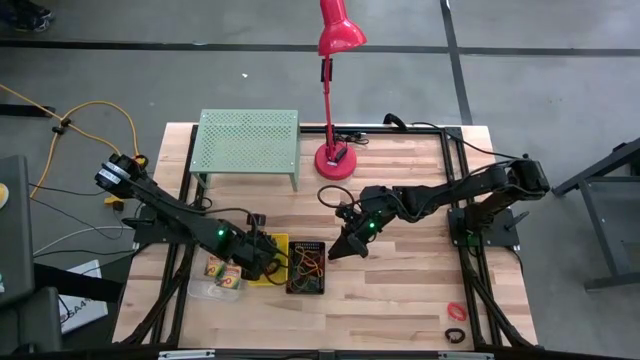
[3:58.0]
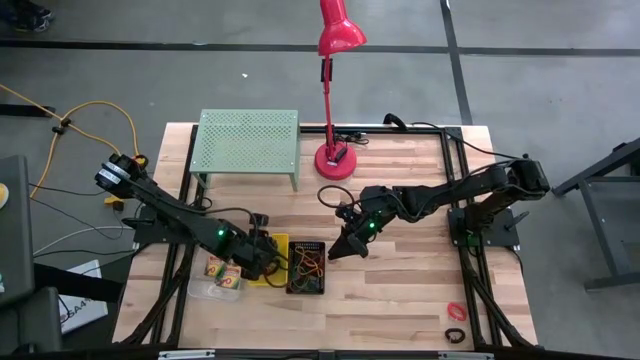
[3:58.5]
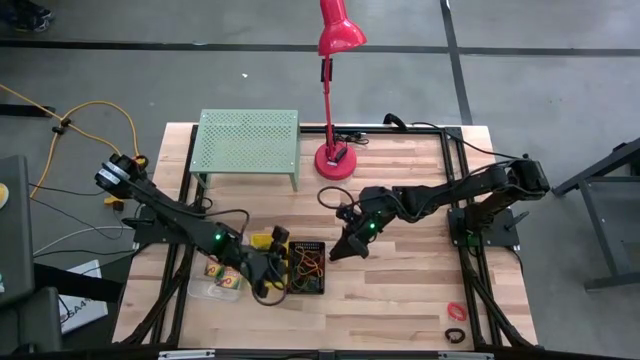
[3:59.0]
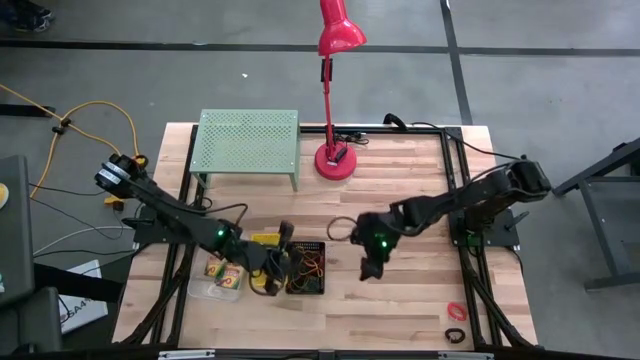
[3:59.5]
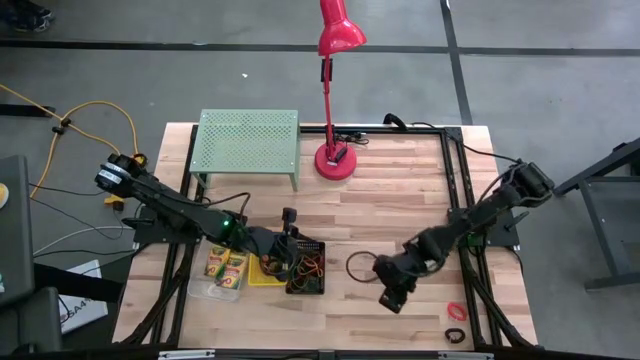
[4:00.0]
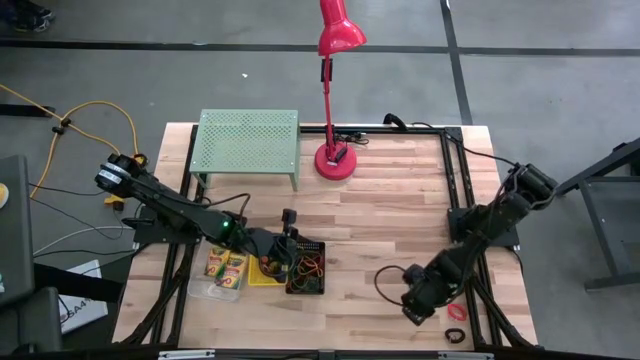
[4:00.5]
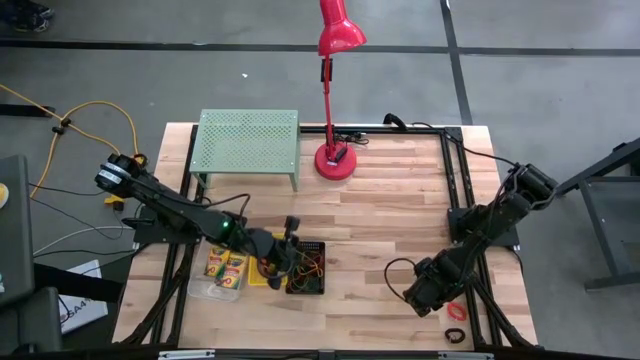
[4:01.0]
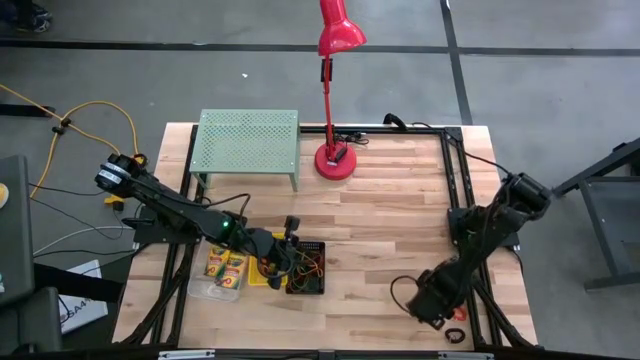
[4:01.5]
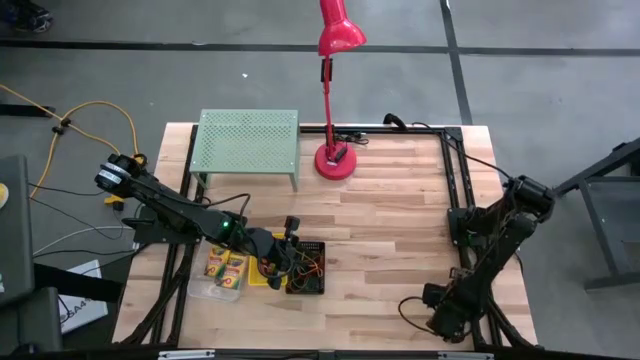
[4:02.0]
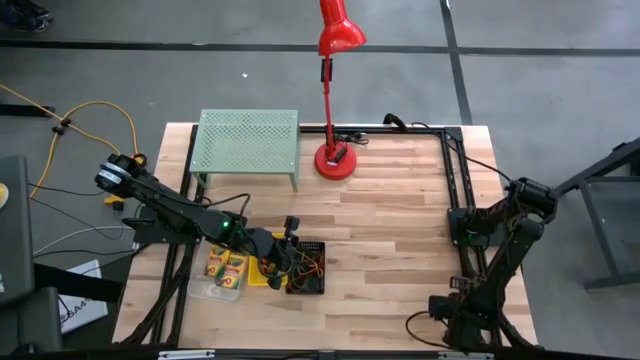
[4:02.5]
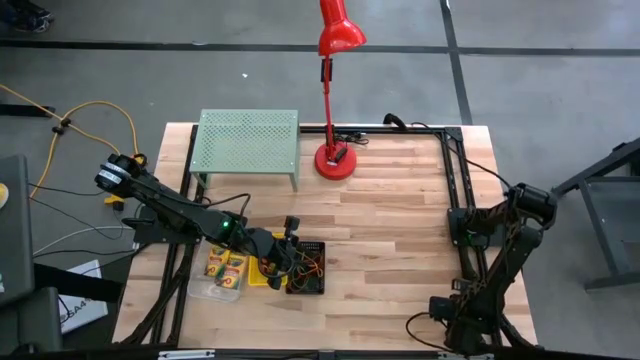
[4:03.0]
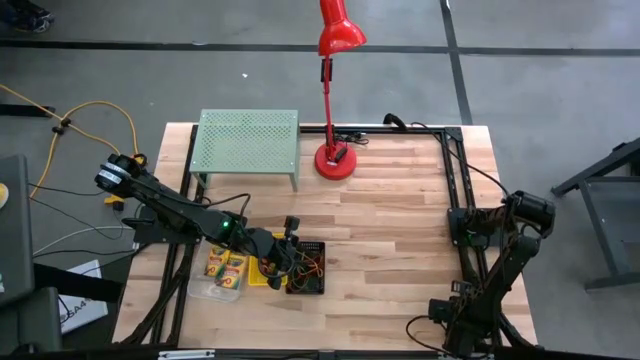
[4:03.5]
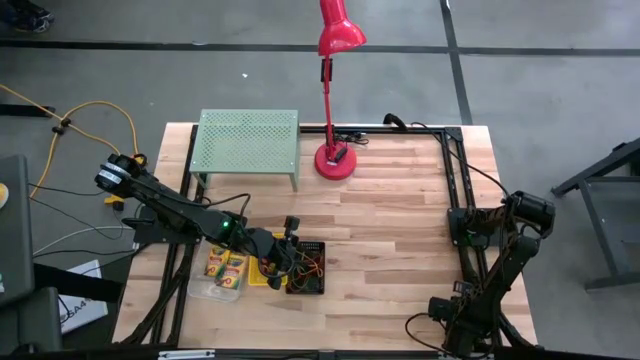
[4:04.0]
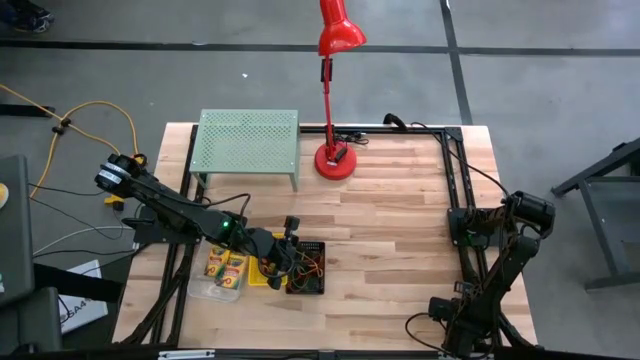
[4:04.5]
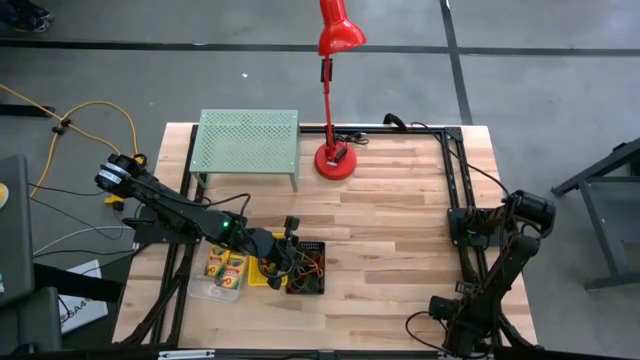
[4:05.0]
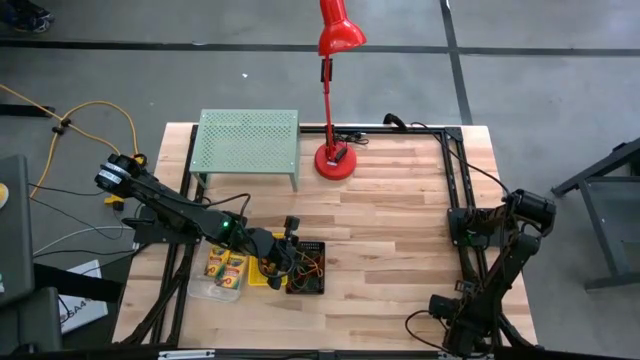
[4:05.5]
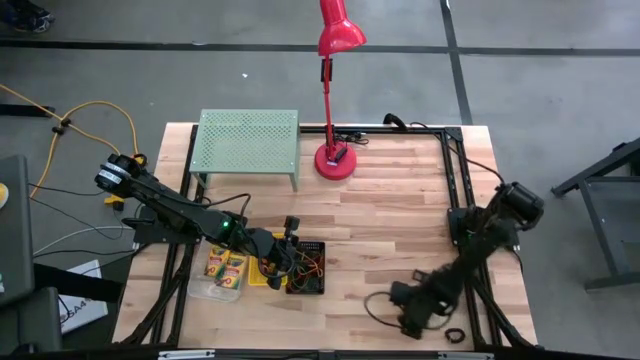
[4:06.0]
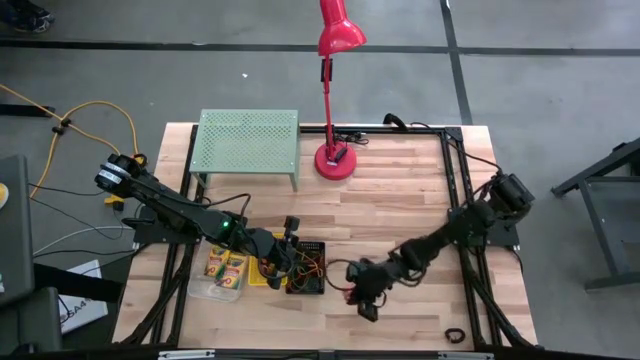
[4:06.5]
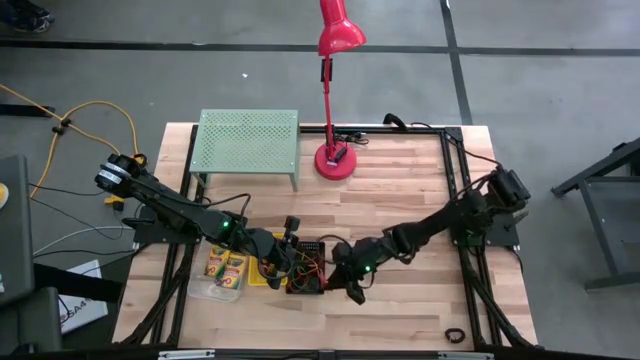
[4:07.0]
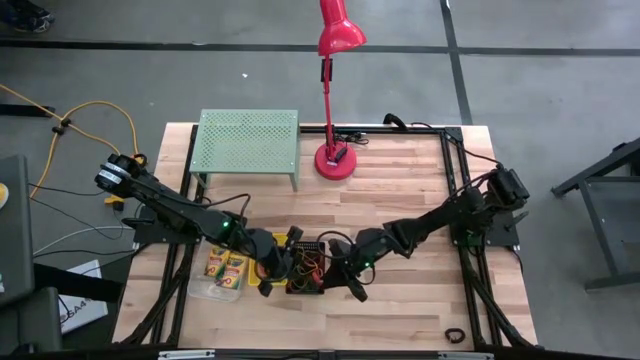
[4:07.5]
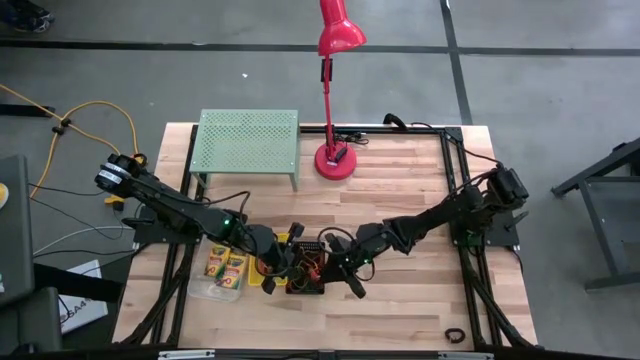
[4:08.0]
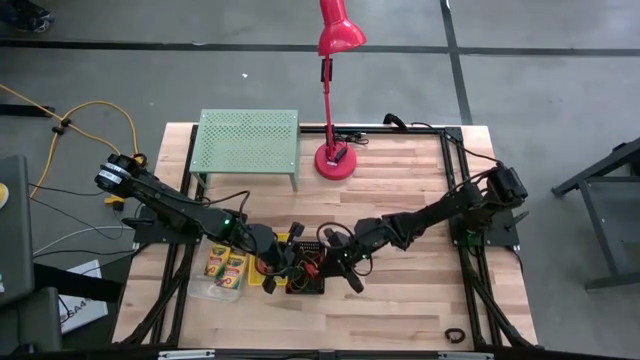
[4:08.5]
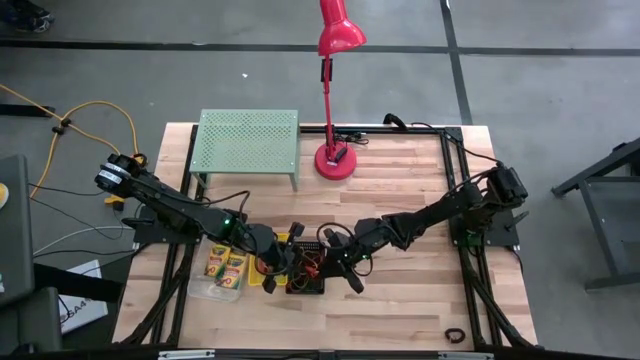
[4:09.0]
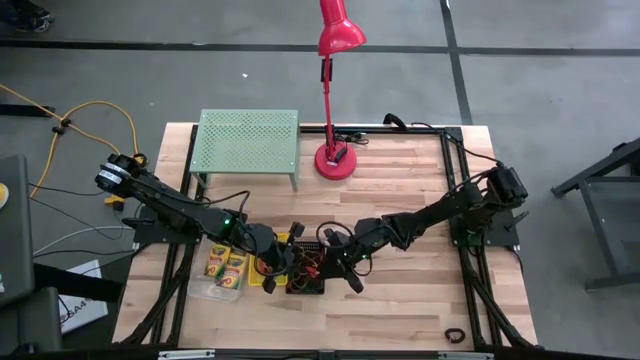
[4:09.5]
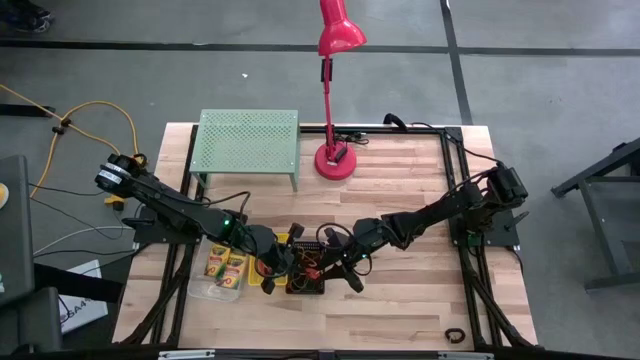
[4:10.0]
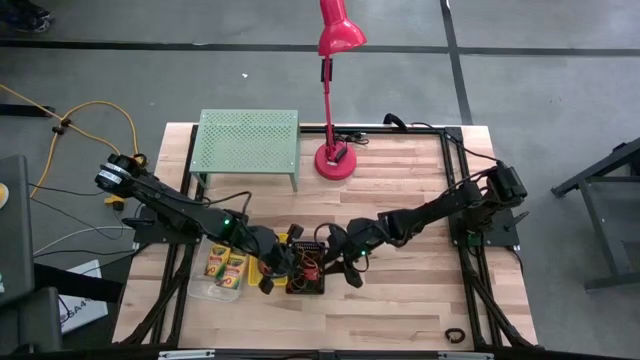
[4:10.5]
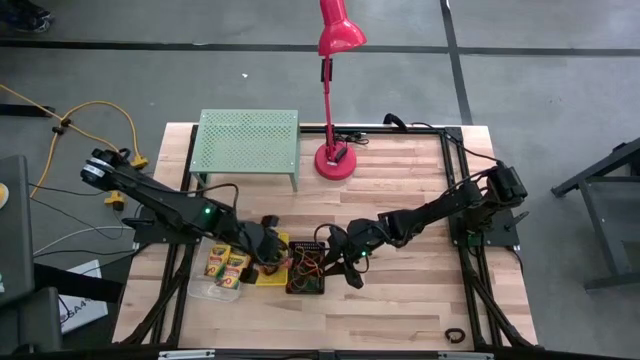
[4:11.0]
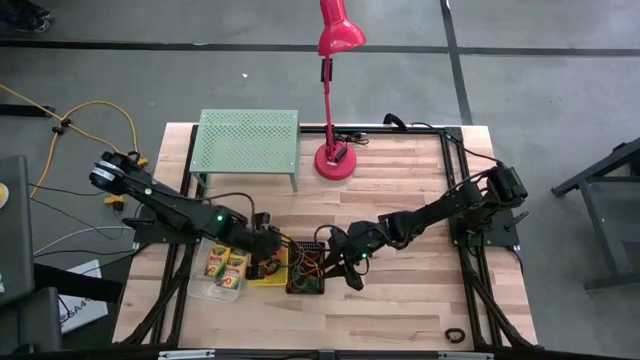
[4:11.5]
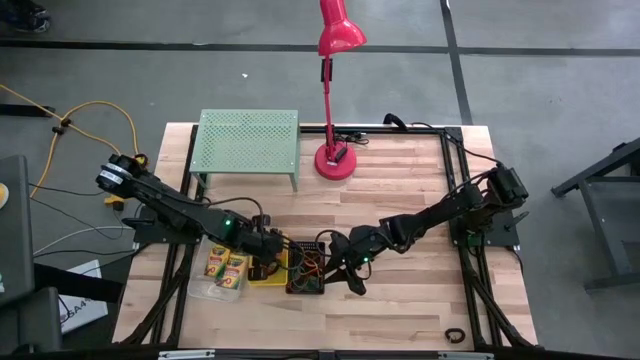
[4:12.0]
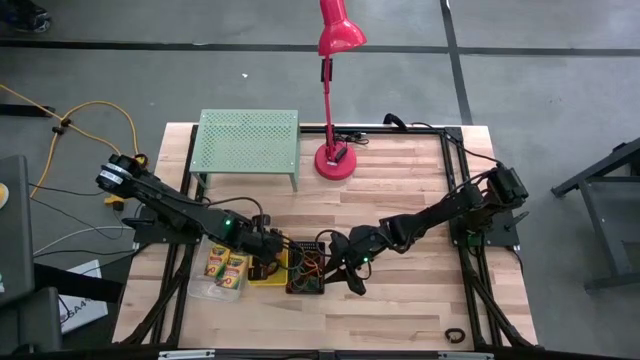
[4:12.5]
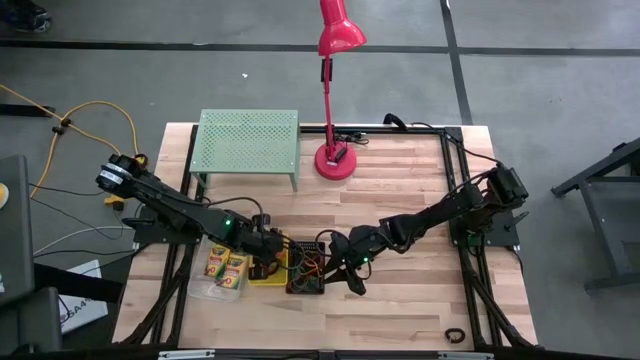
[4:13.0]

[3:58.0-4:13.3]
Task: Pick & Place Office Desk Supplies
Put the orange spring keychain into the yellow bin
